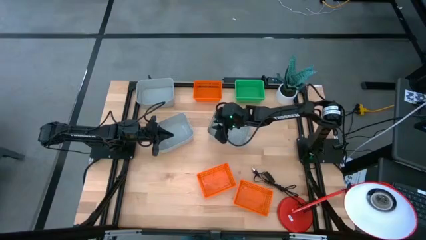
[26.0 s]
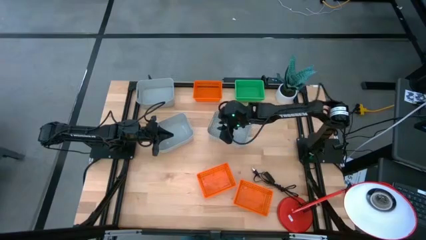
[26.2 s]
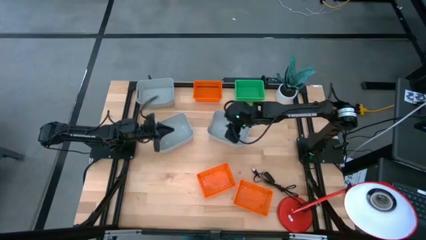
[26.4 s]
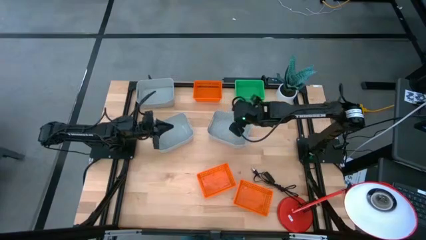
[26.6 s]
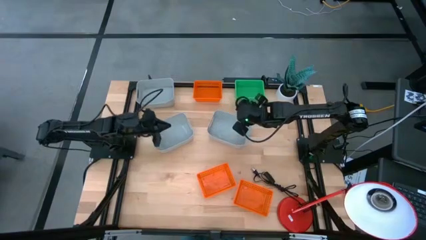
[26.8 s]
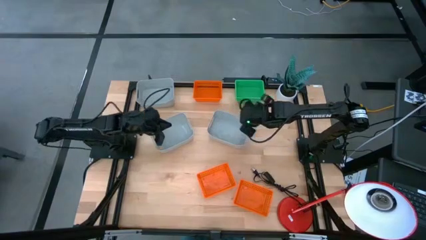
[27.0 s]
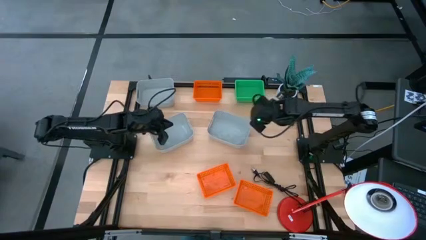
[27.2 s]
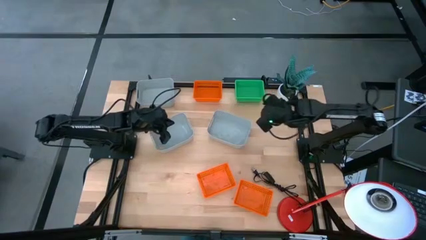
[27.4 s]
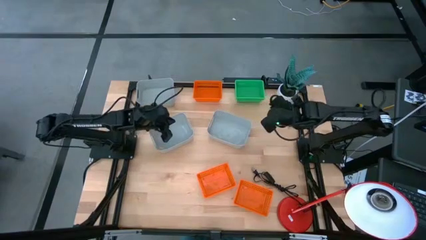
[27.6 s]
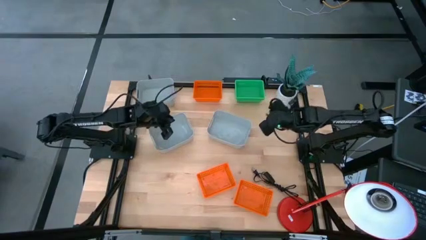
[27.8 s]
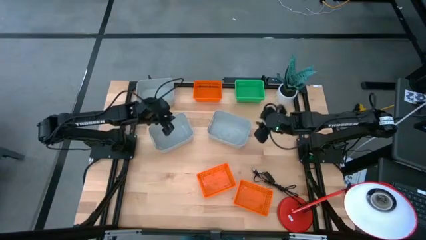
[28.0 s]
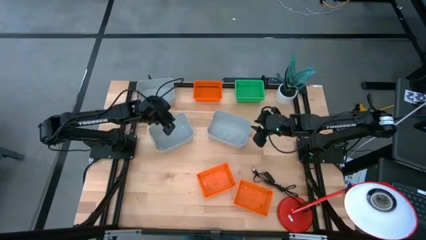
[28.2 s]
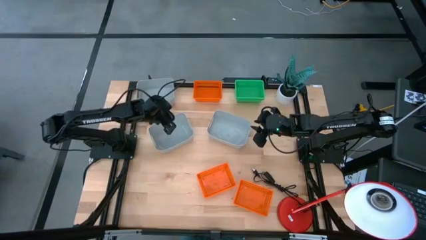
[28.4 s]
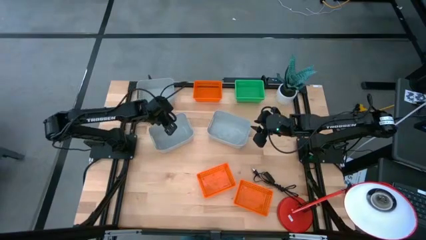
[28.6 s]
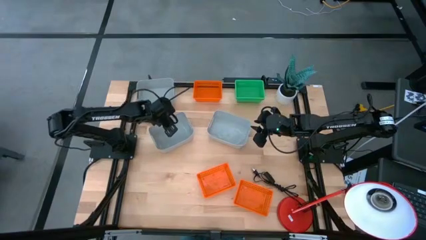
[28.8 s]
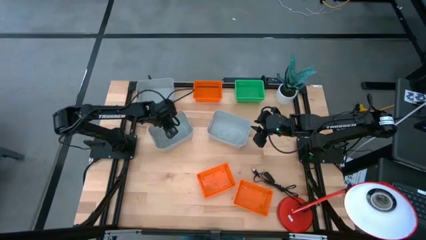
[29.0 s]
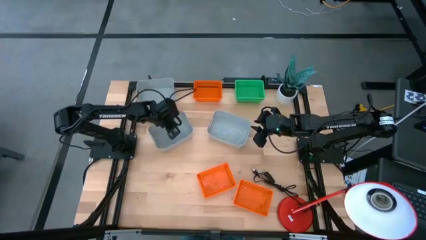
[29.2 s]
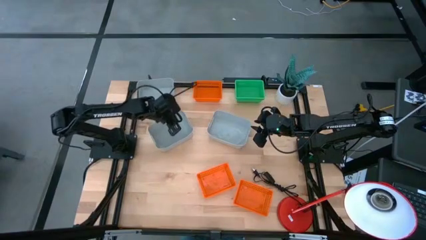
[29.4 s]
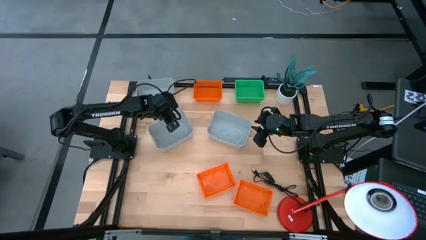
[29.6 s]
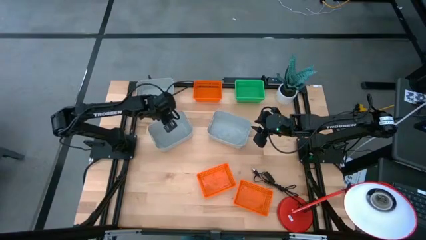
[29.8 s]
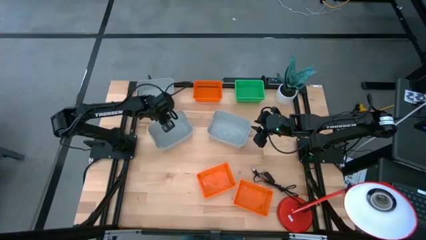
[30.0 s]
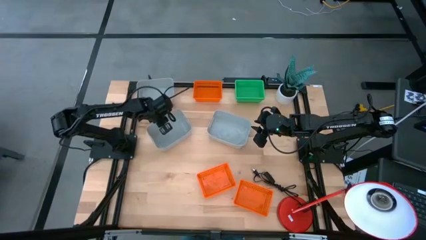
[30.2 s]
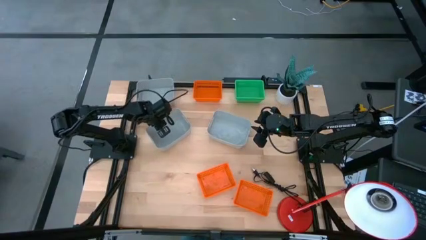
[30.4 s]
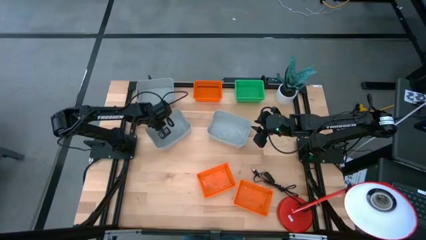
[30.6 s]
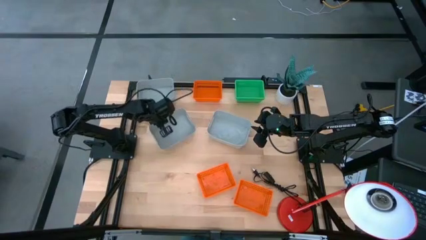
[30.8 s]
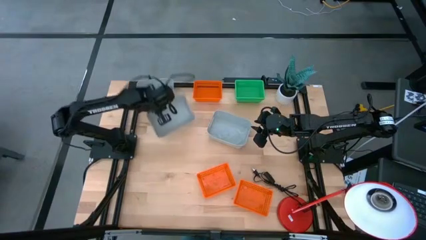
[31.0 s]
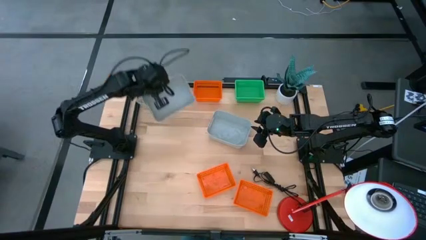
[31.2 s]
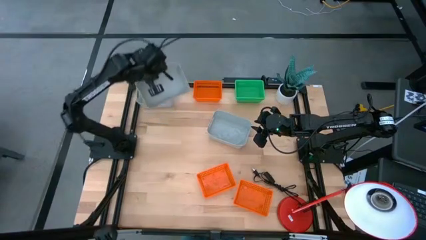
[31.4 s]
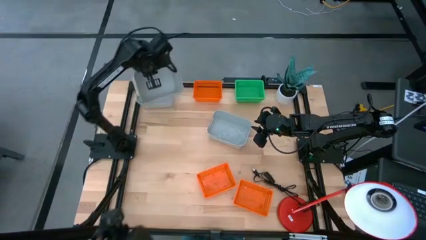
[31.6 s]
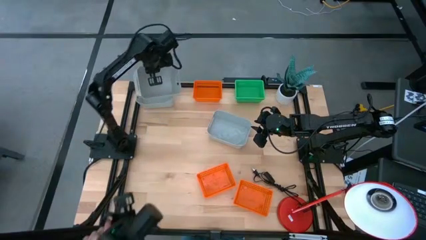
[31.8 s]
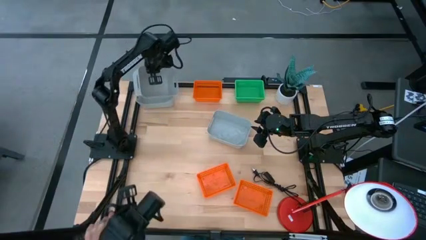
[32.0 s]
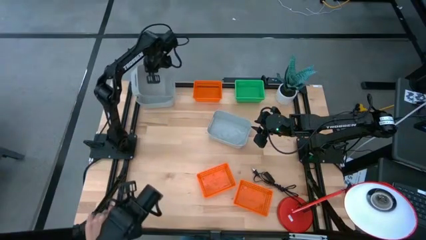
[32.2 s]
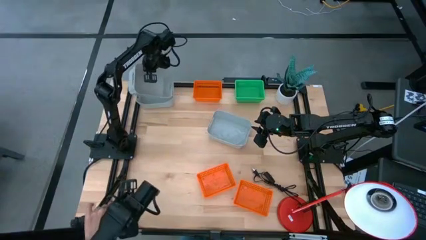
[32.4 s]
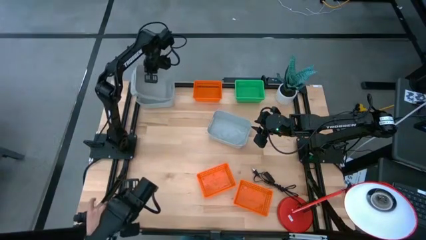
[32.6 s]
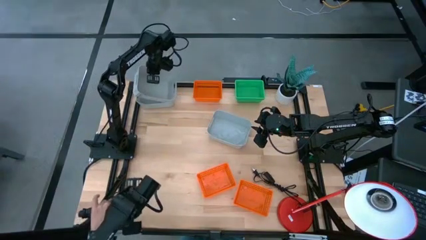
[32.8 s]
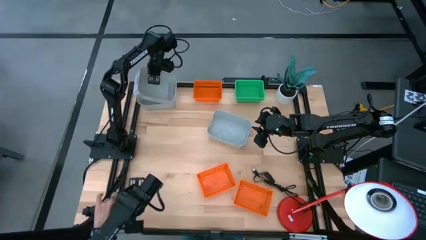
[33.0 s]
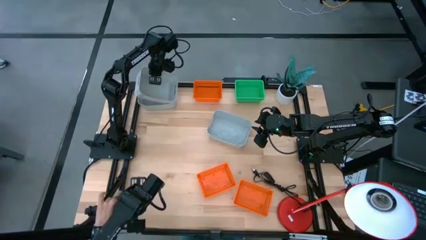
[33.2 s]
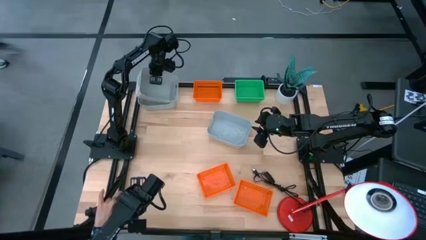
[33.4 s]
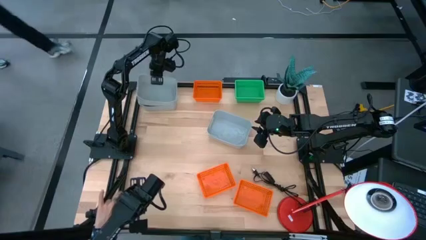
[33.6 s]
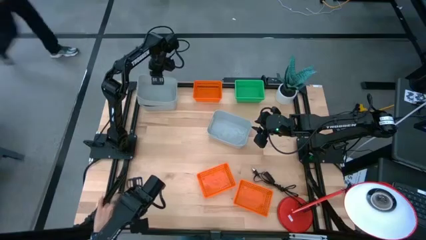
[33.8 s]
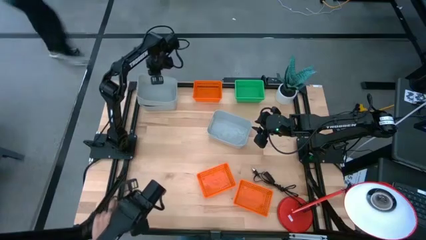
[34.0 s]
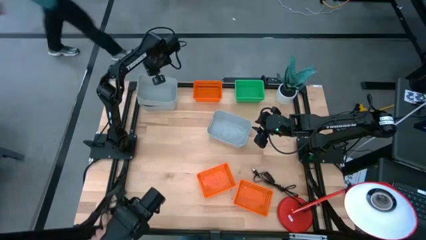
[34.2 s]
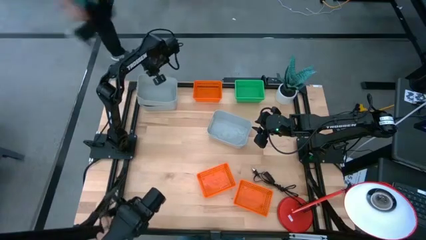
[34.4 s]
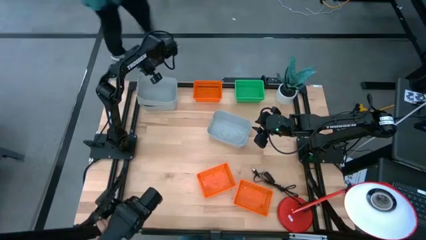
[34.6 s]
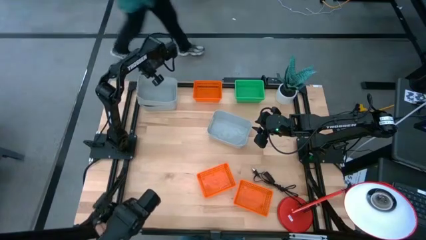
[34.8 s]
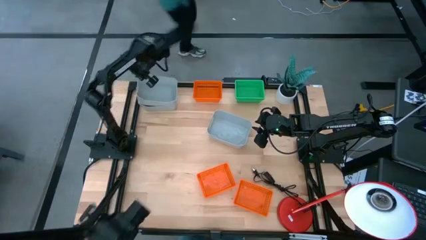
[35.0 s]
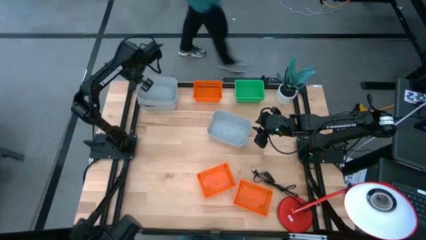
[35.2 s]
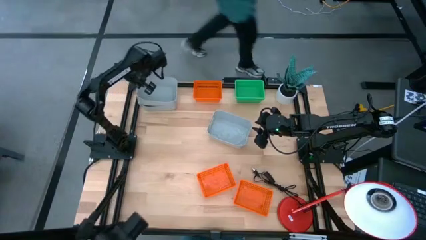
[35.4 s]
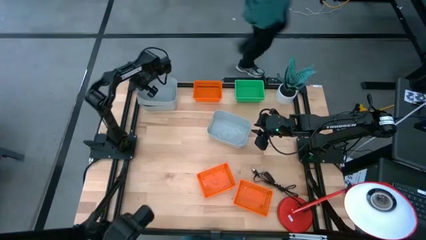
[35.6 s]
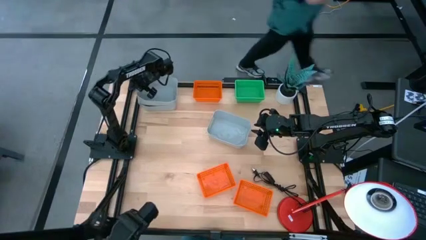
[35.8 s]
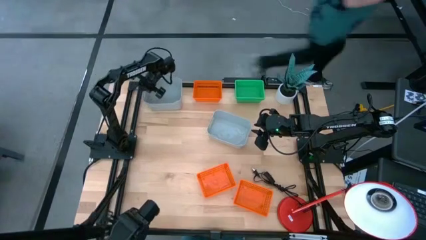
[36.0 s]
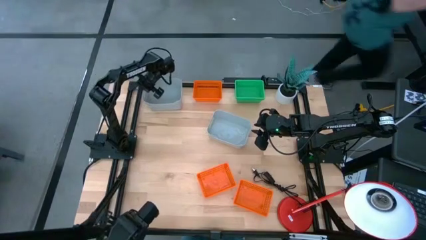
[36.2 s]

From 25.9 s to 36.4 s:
Stack the bottom left gray bin on top of the top gray bin

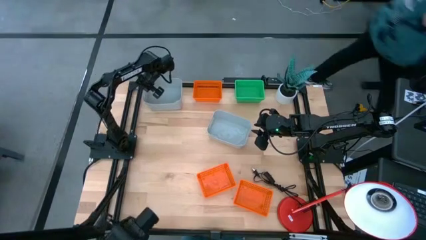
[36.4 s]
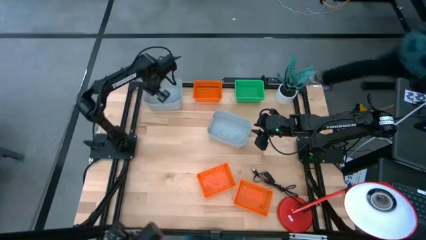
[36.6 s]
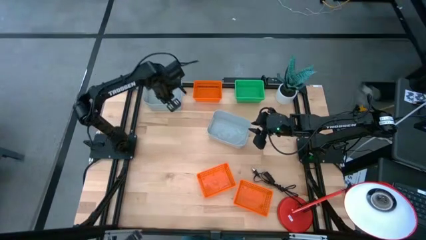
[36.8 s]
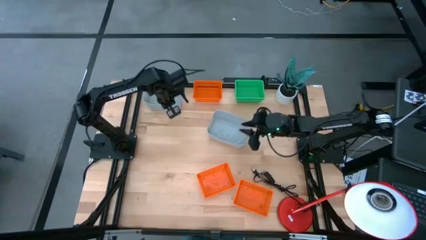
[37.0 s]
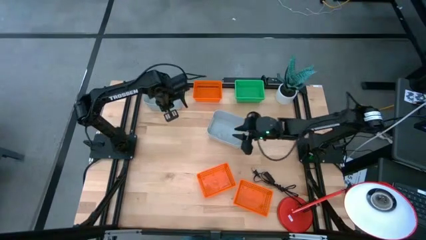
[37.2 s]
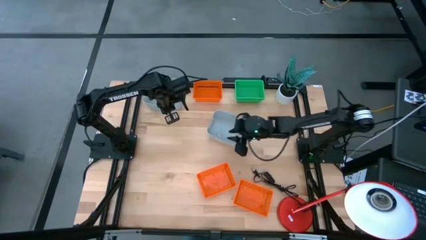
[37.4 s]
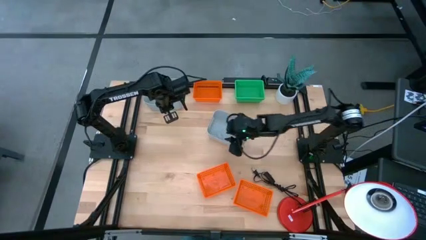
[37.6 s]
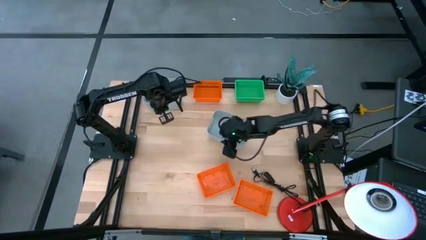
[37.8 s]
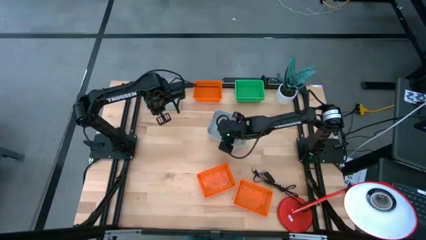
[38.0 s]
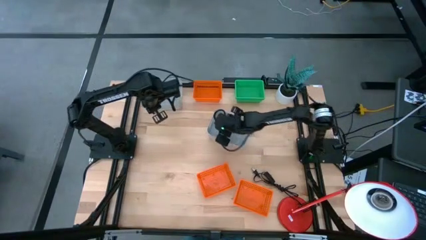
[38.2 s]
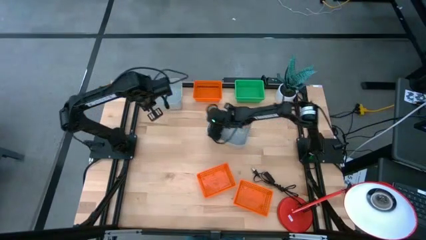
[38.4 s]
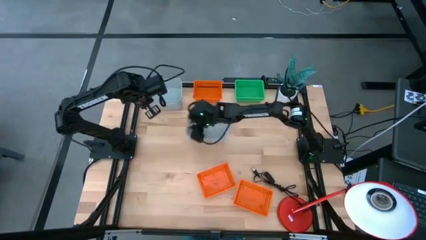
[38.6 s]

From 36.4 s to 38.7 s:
Move the gray bin to the top left of the table
